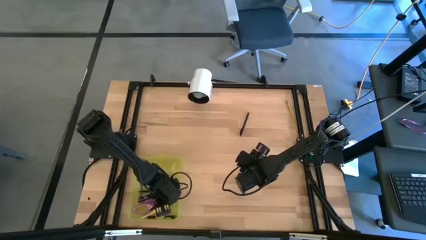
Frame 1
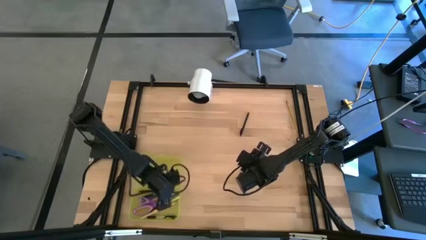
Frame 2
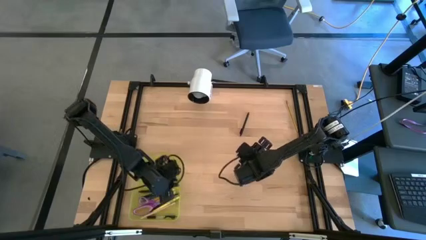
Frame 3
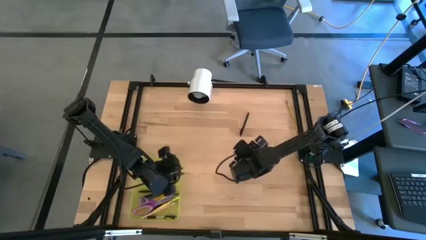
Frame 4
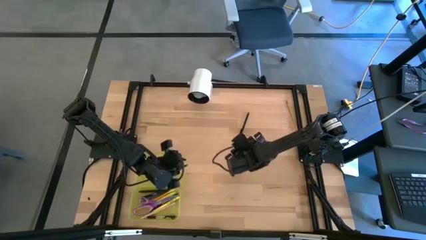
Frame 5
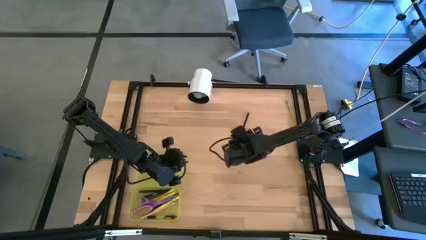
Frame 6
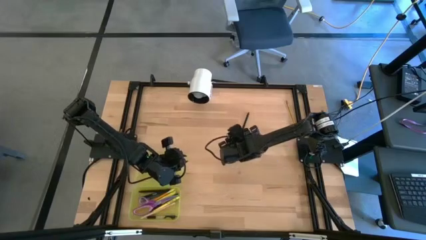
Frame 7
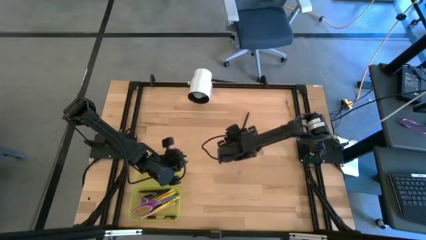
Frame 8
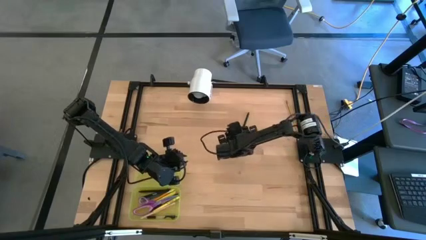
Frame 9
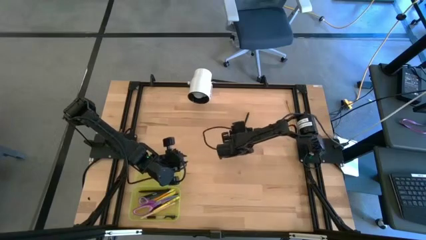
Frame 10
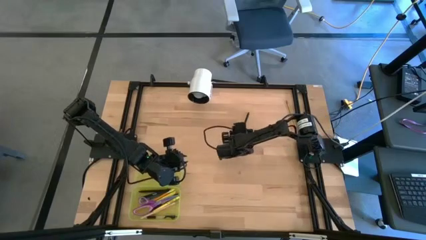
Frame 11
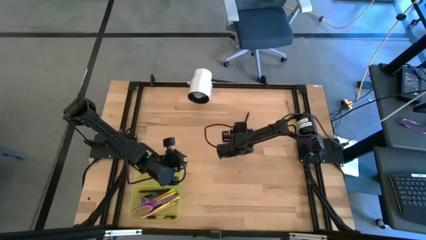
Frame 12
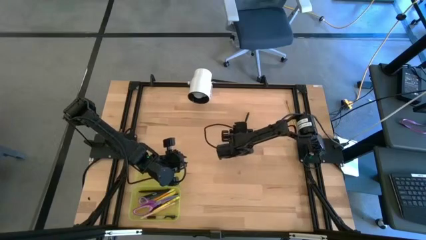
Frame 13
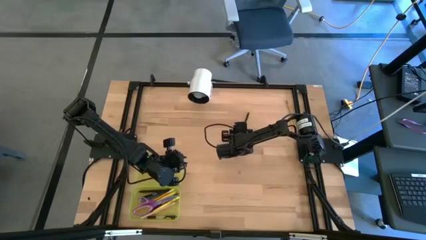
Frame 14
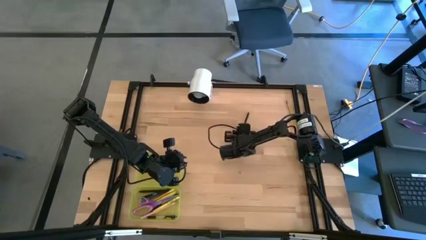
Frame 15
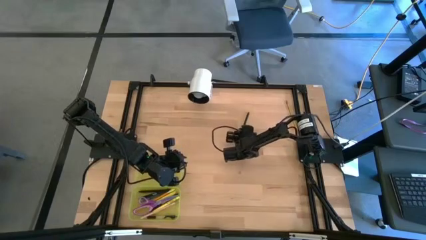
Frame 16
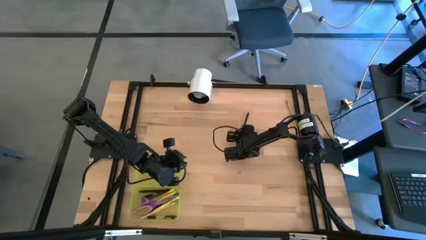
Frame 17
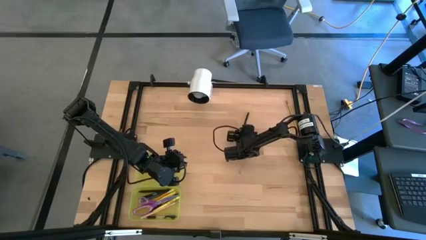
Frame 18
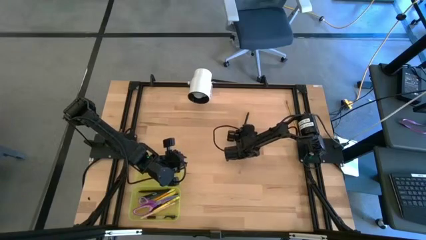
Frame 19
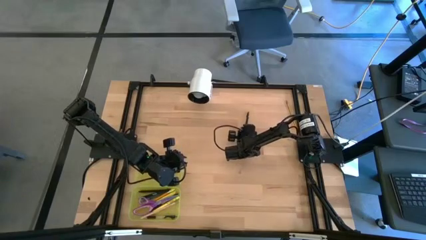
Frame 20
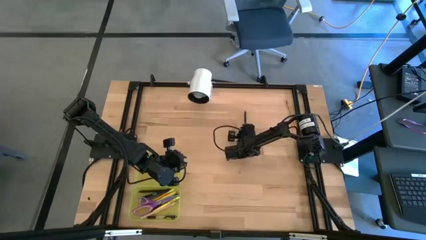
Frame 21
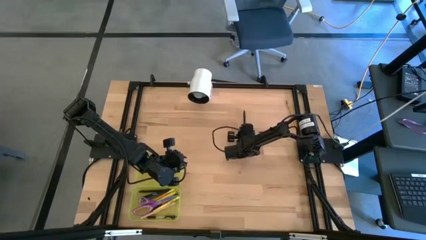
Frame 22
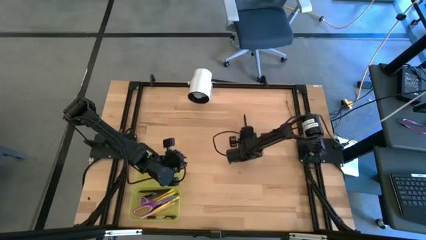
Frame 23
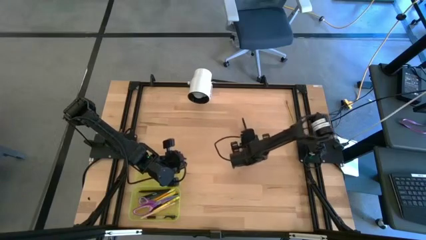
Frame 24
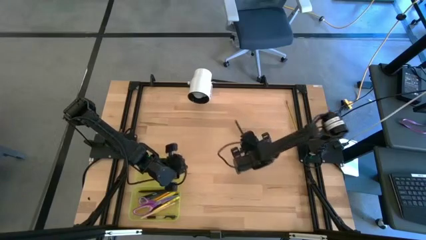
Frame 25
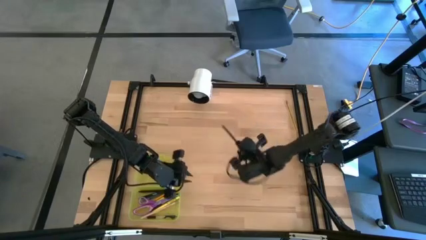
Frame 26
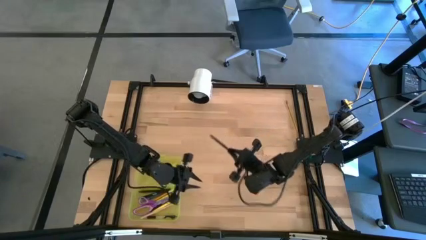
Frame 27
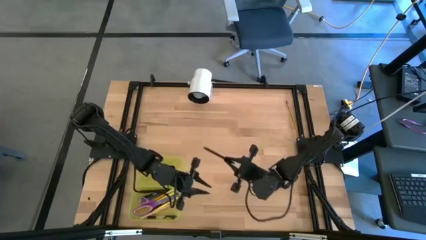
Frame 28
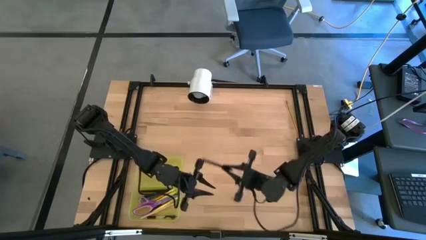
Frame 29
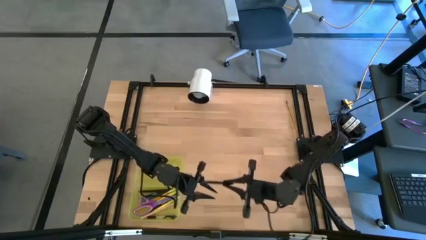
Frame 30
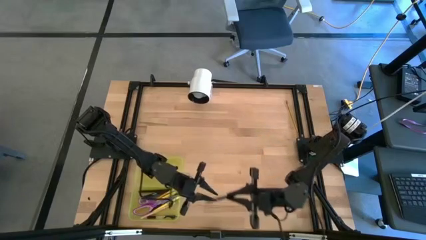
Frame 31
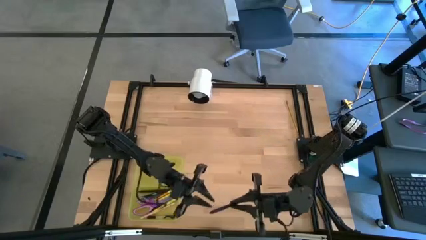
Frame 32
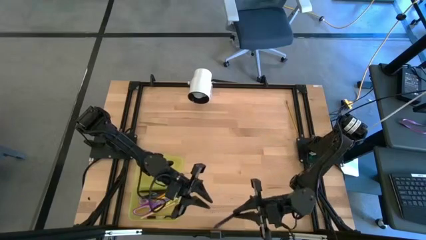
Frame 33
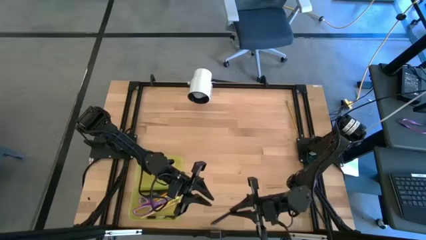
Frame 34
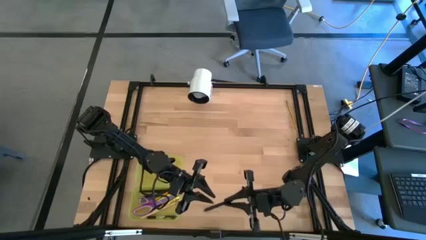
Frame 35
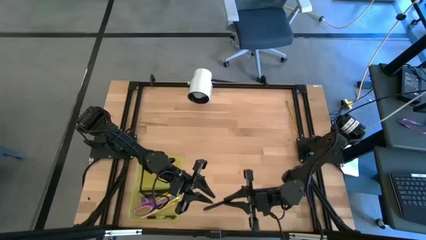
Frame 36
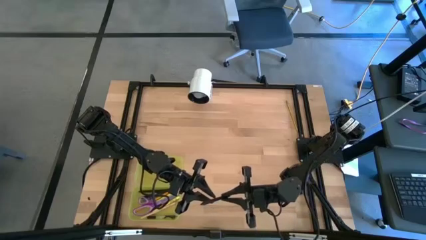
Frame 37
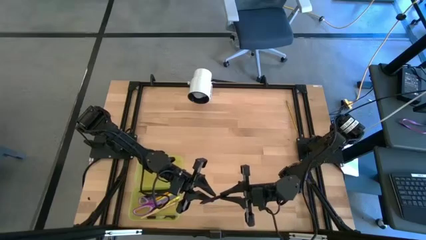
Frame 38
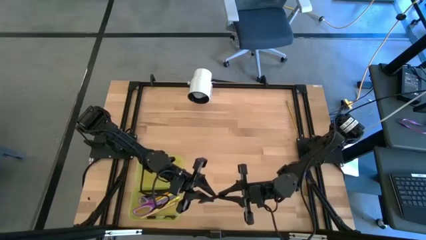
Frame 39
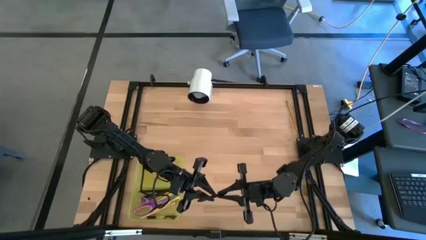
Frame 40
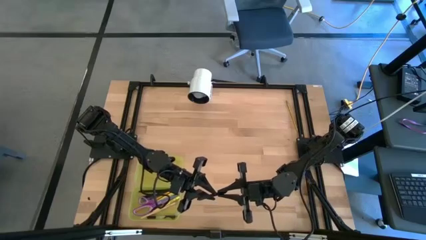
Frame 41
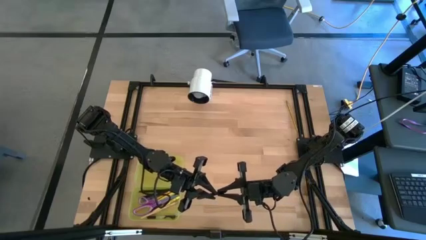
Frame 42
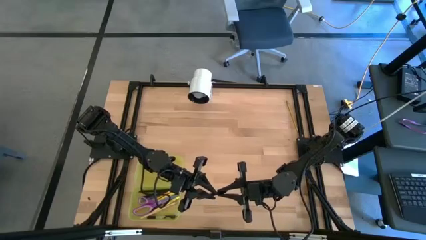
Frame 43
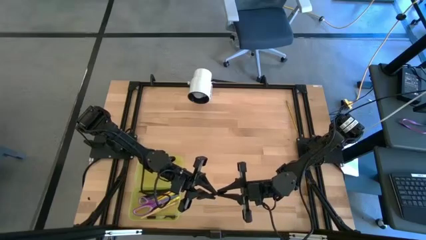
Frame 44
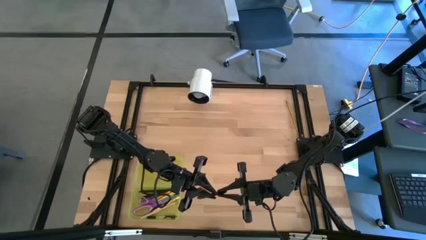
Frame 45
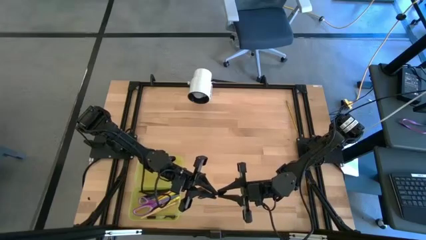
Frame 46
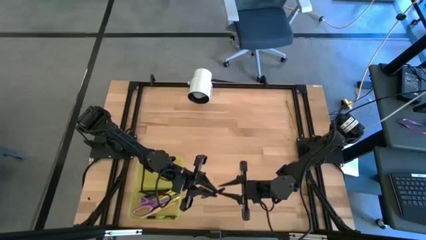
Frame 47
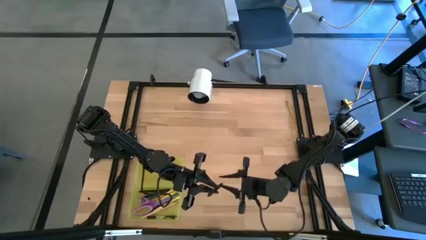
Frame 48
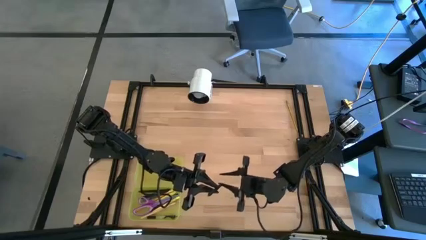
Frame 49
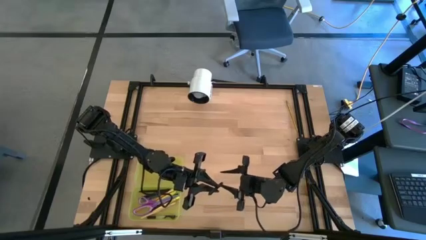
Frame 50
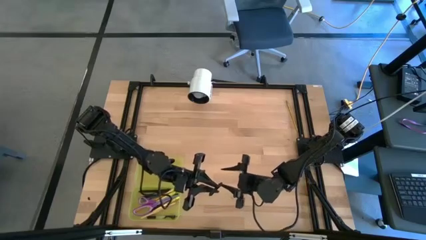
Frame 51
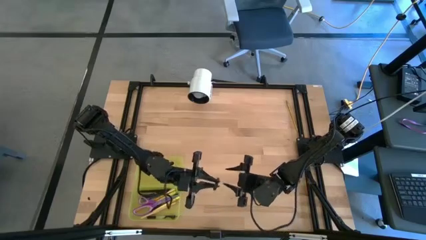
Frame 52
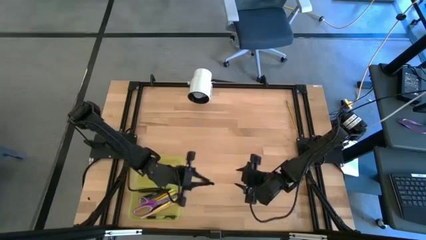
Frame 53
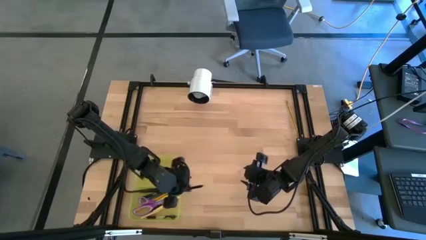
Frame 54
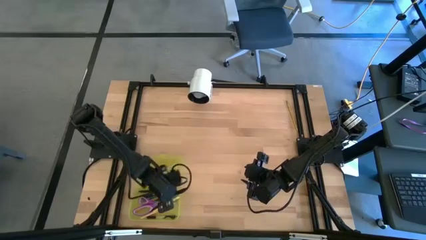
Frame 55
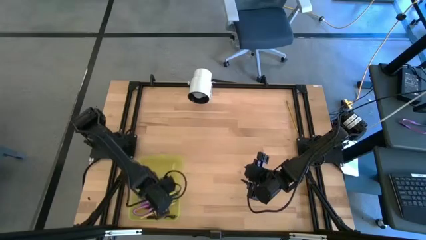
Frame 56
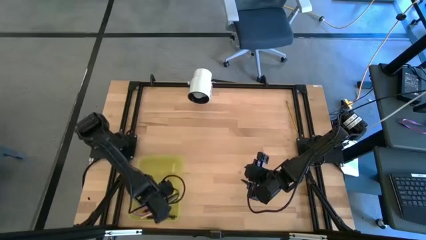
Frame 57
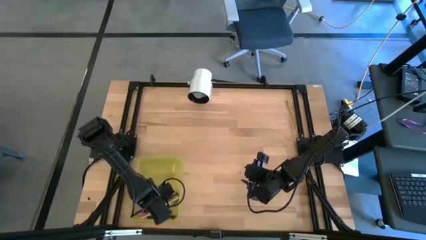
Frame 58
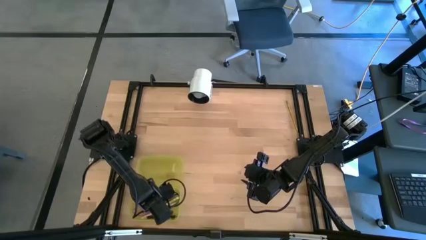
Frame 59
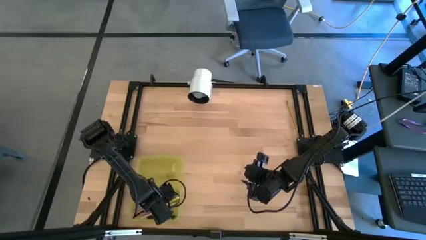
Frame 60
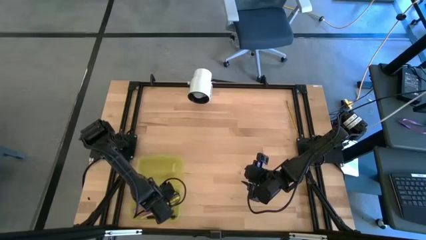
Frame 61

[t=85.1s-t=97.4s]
Task: Pick & place school supplies into a supply box
Put the black pen into the yellow supply box

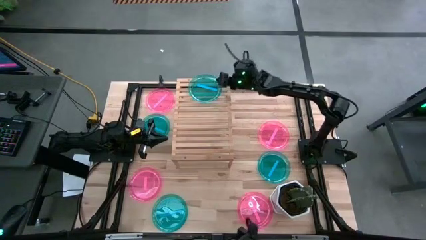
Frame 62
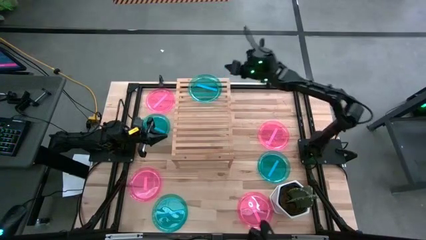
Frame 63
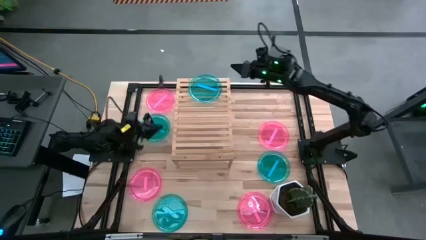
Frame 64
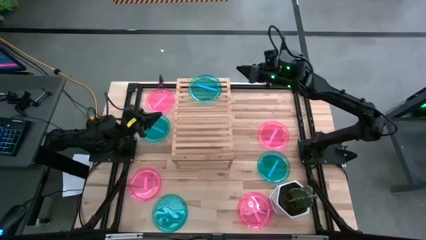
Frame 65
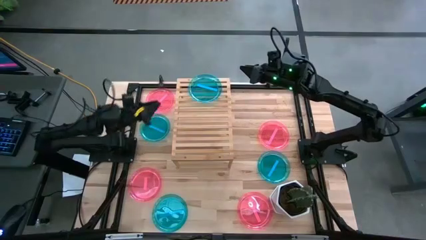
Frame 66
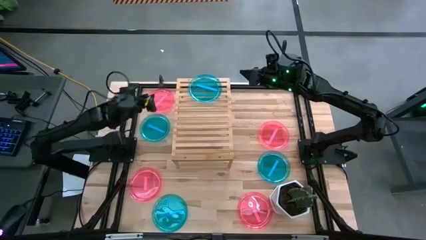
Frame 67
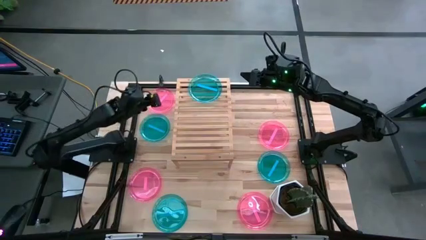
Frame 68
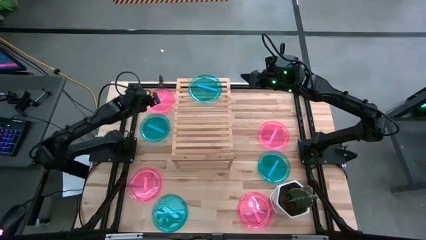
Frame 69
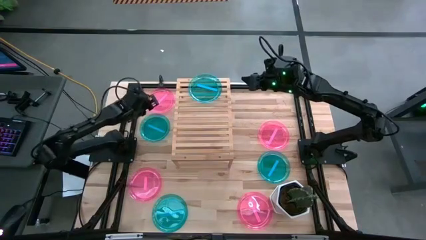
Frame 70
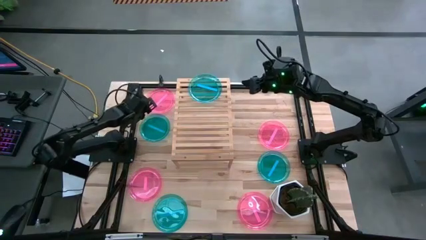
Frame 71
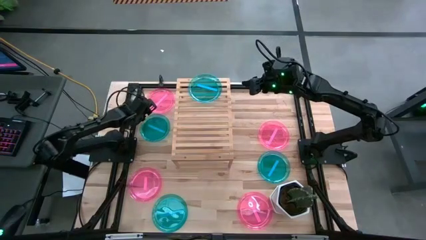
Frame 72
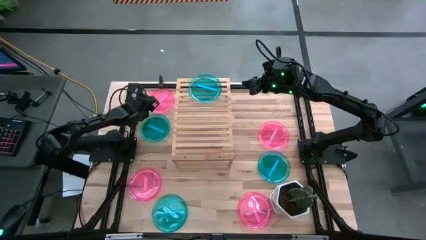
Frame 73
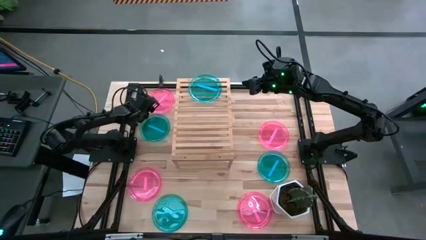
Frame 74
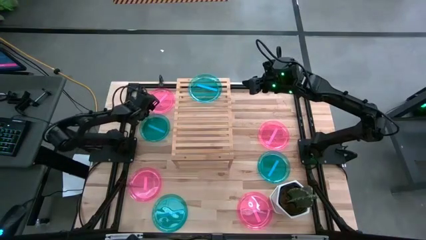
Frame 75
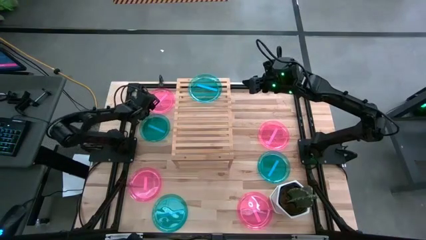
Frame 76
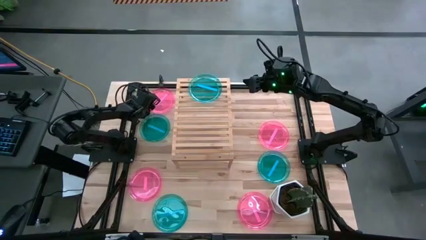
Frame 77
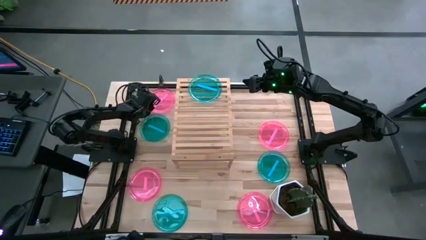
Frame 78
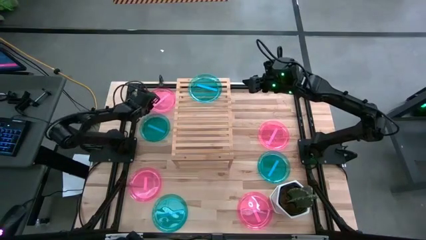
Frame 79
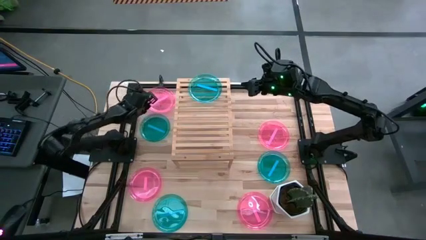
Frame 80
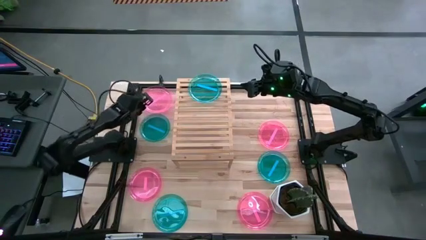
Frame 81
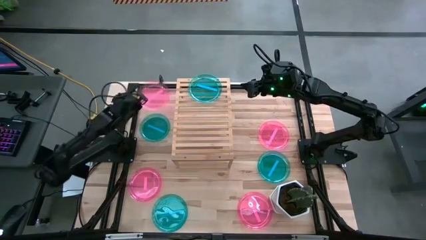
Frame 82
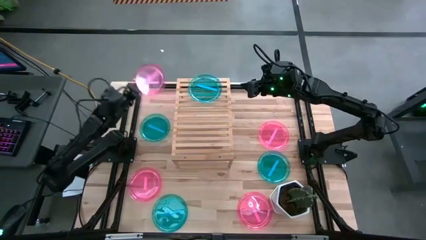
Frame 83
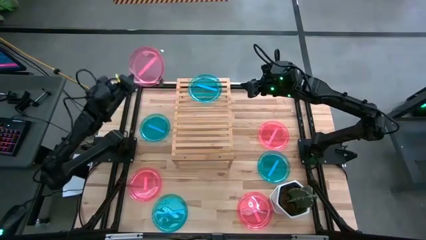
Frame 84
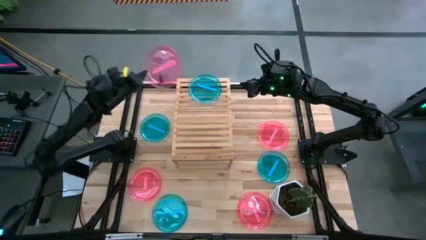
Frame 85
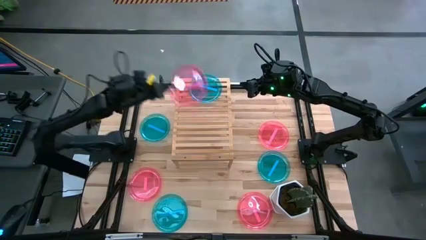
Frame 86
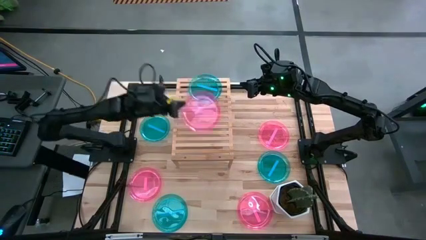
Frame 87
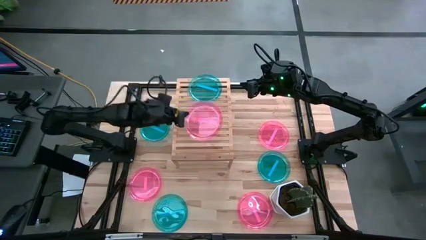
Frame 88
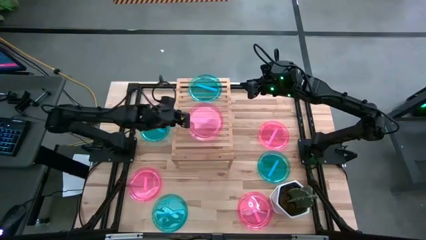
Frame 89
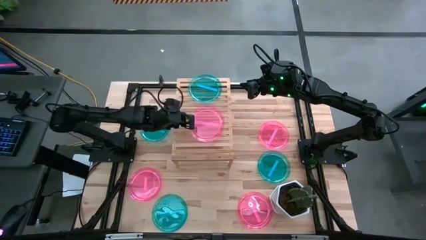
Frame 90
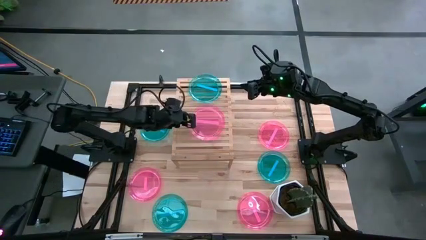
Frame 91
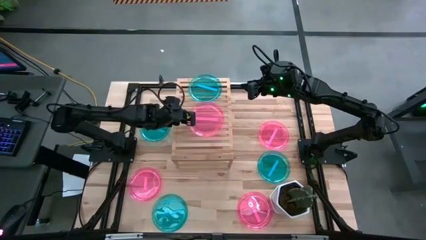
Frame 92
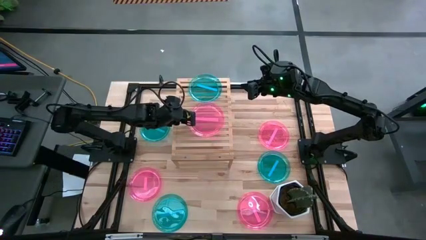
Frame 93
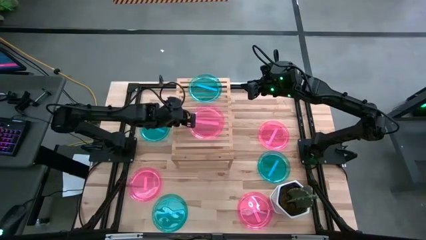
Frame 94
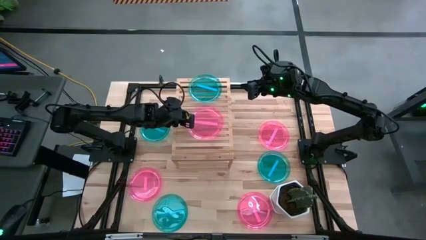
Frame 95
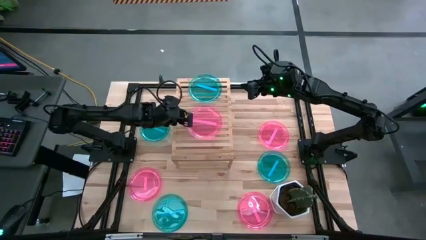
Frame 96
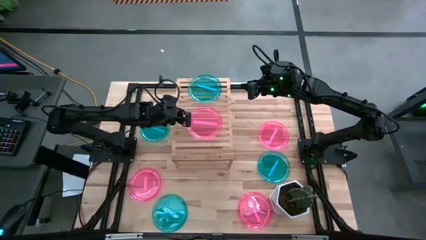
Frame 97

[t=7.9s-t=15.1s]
Task: Place and stack plates onto a shelf
Put the pink plate on the shelf
